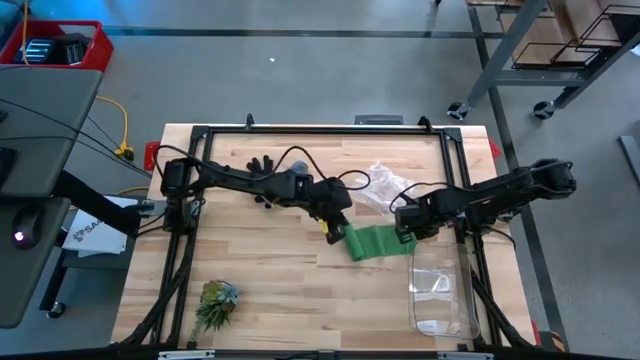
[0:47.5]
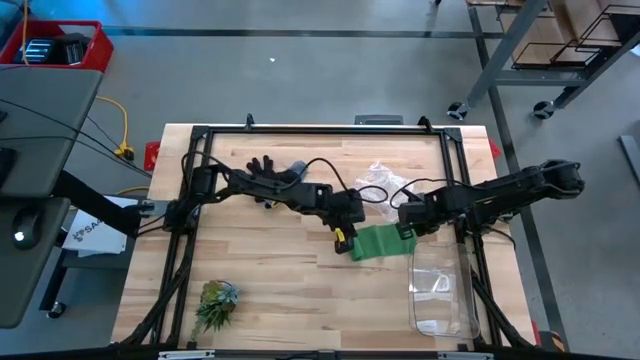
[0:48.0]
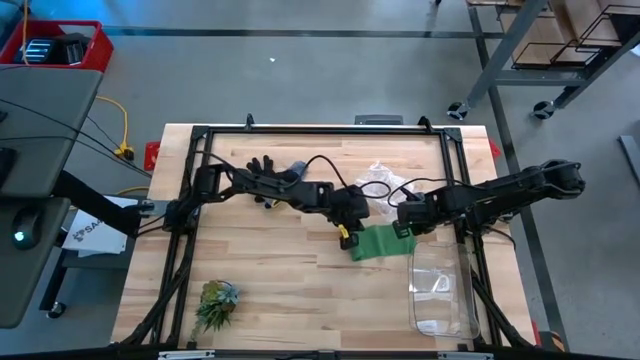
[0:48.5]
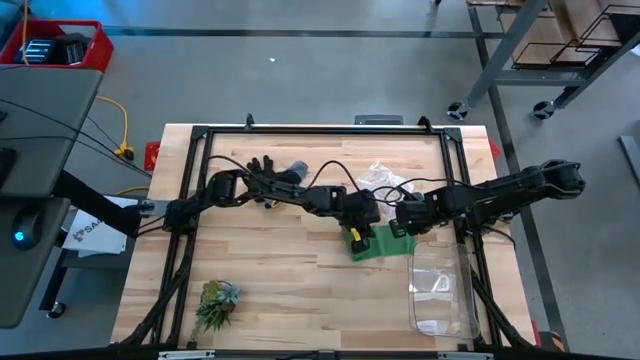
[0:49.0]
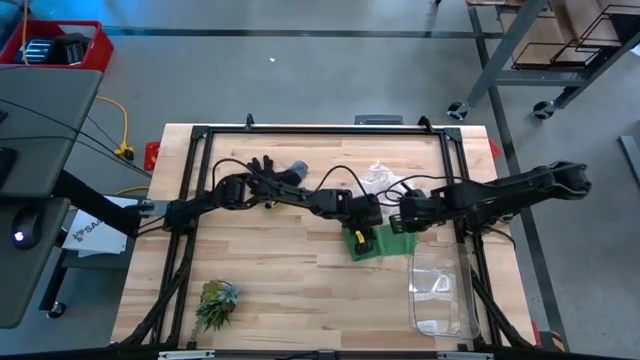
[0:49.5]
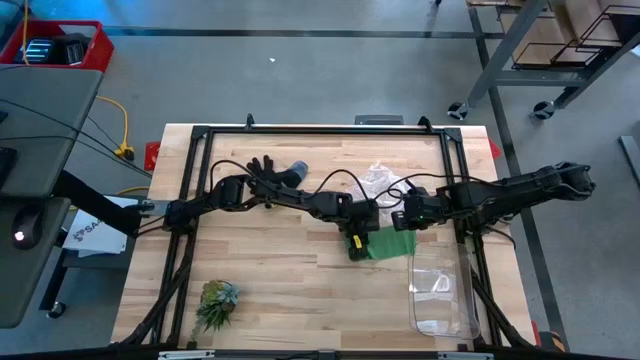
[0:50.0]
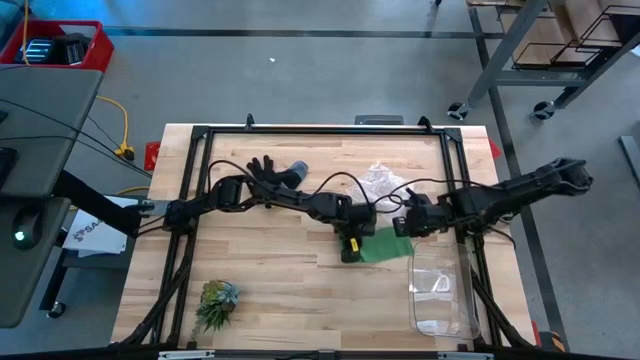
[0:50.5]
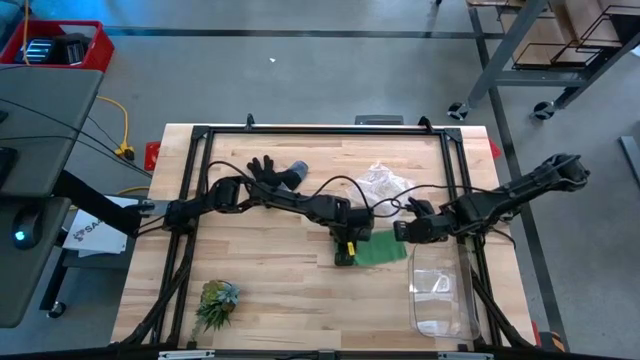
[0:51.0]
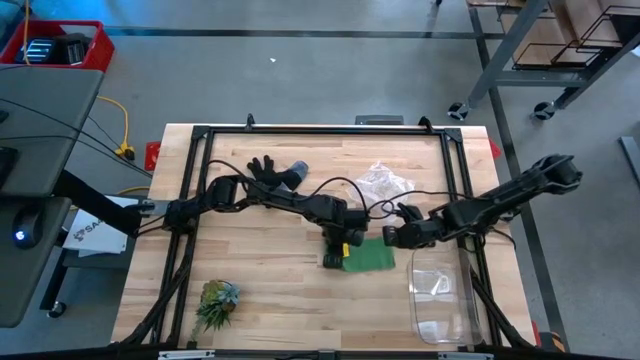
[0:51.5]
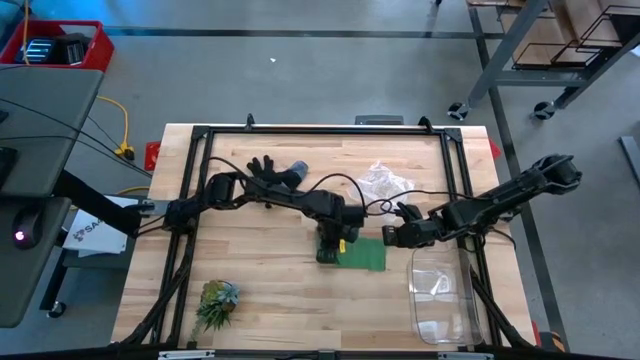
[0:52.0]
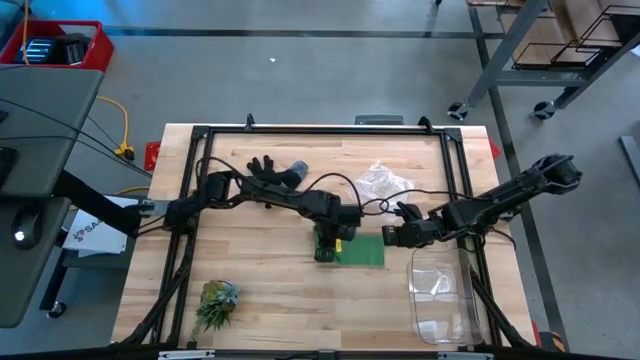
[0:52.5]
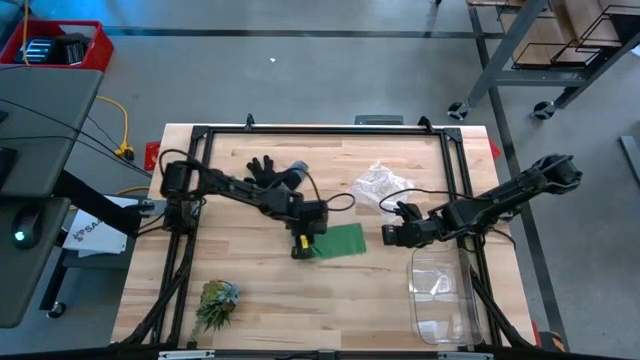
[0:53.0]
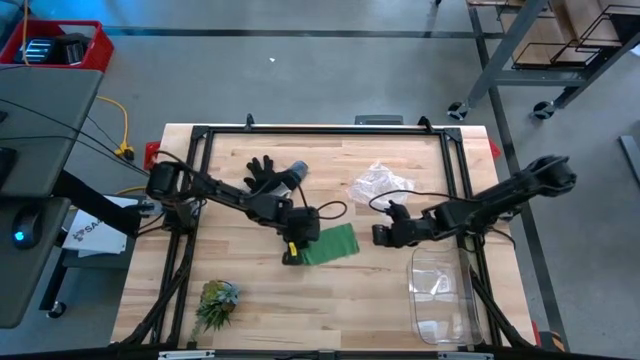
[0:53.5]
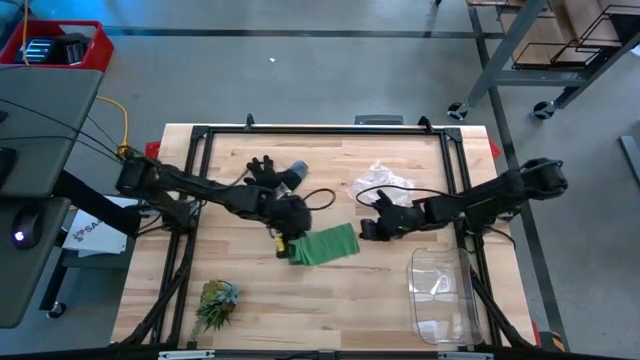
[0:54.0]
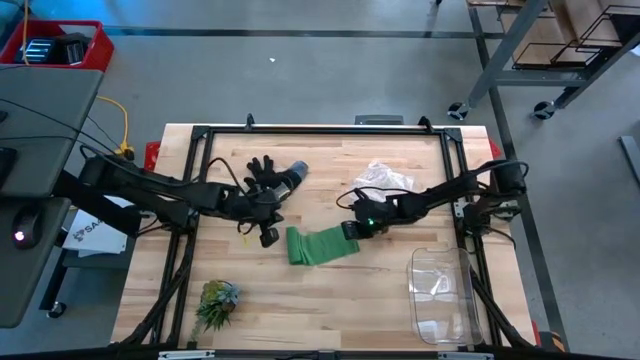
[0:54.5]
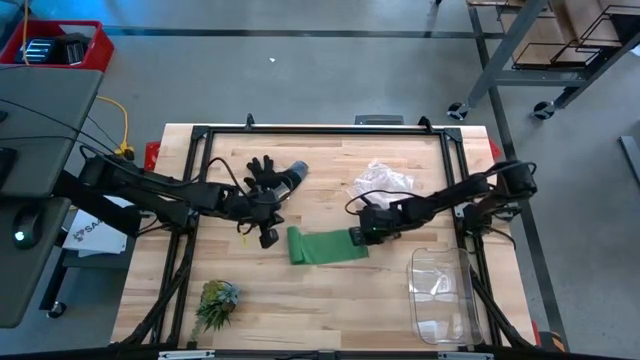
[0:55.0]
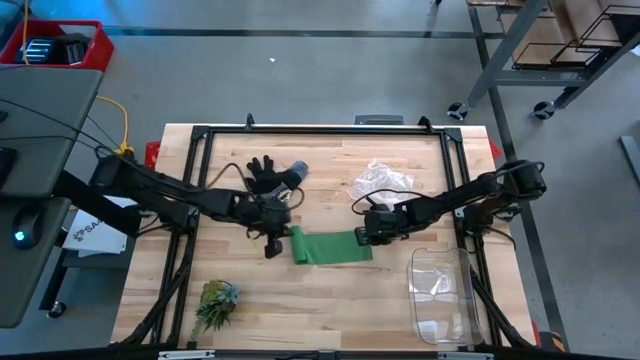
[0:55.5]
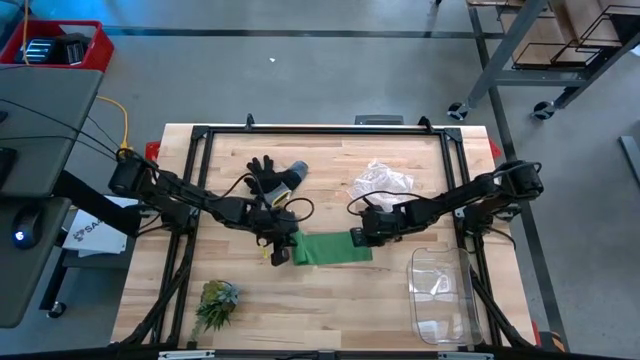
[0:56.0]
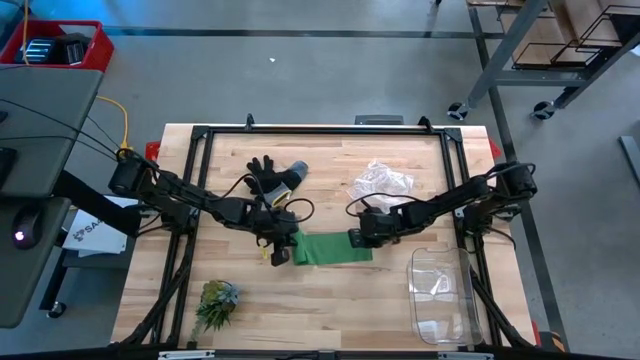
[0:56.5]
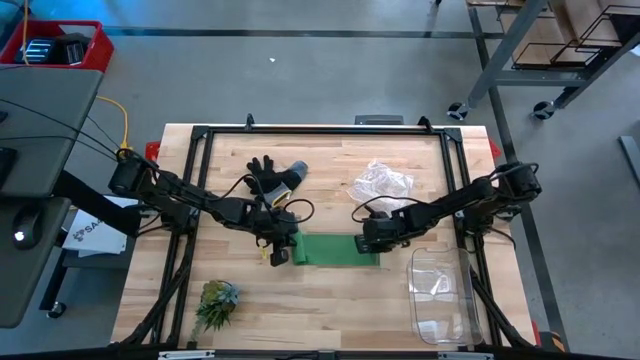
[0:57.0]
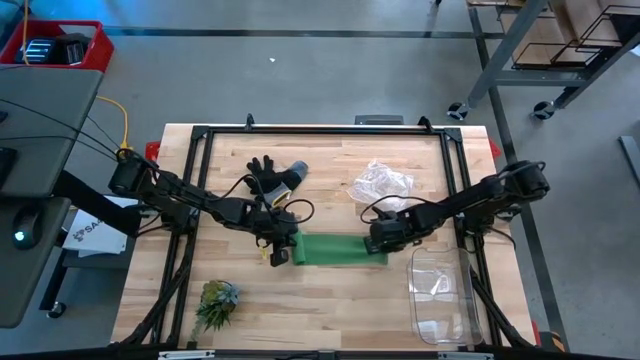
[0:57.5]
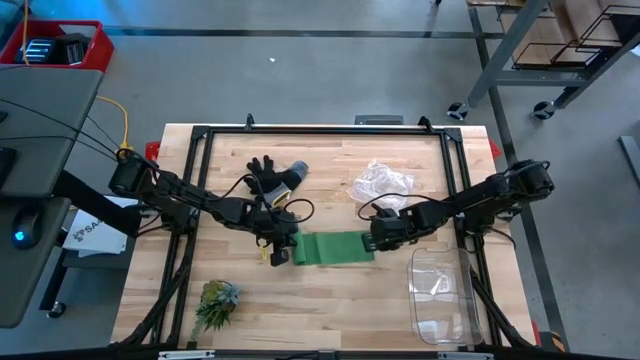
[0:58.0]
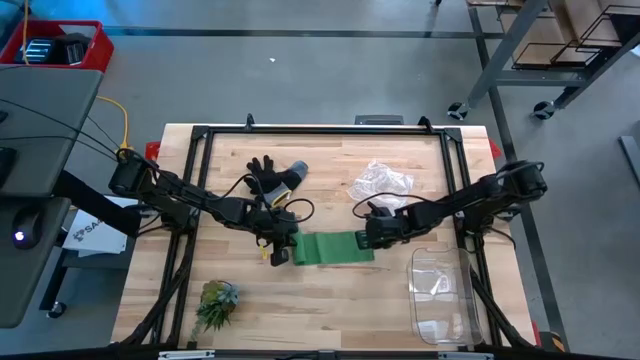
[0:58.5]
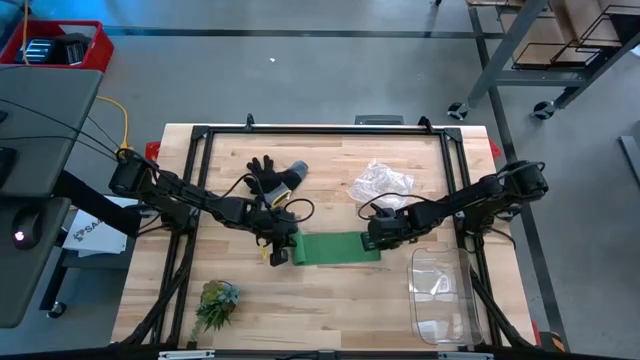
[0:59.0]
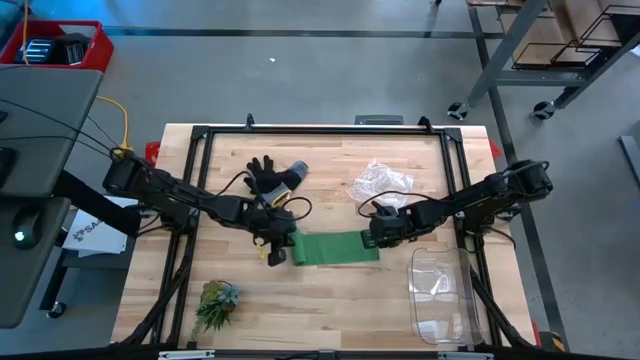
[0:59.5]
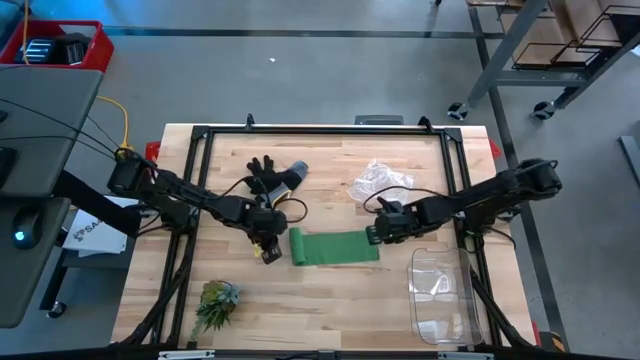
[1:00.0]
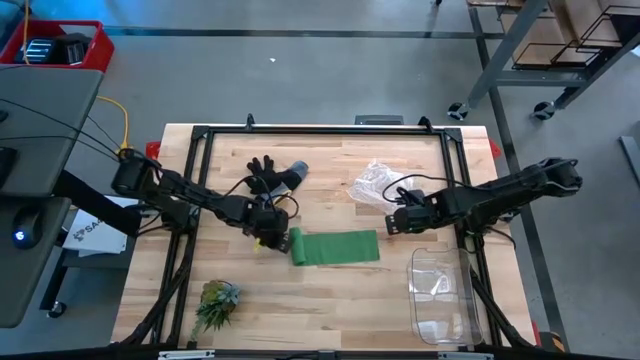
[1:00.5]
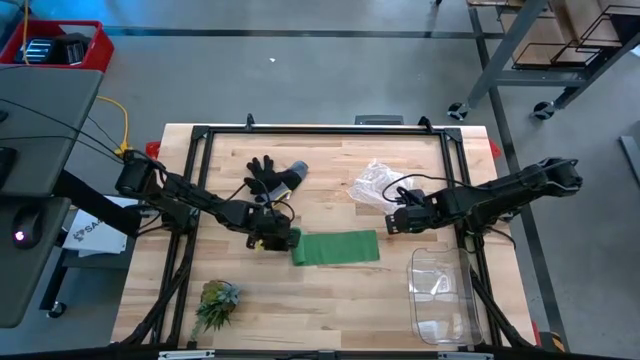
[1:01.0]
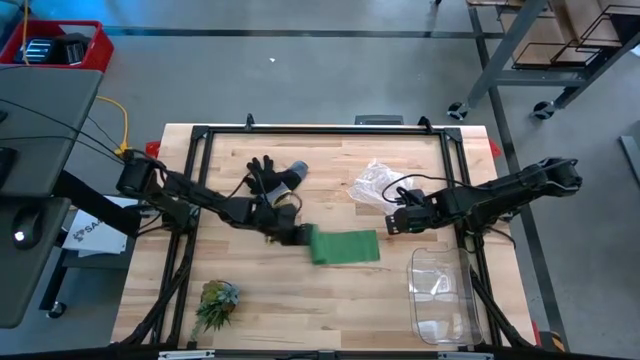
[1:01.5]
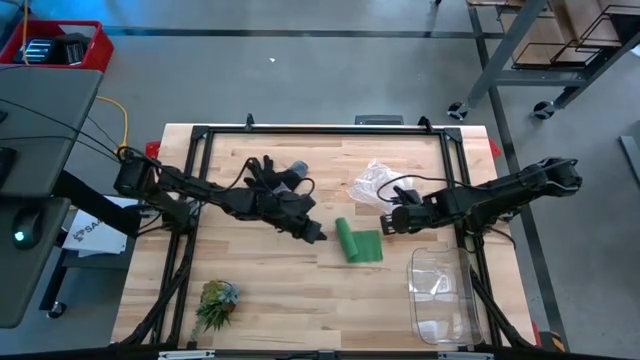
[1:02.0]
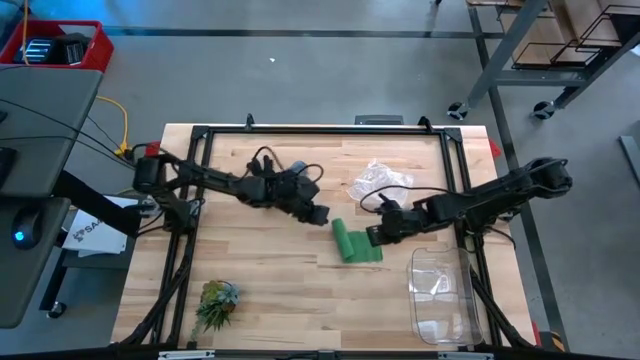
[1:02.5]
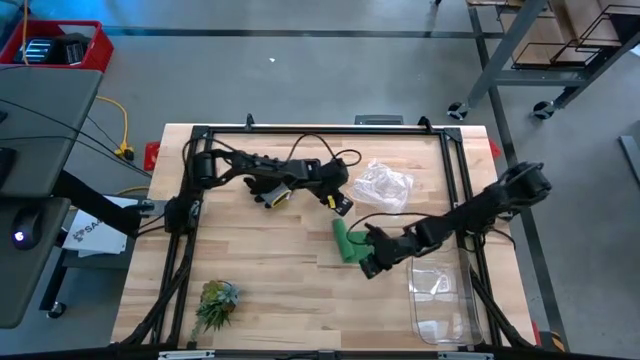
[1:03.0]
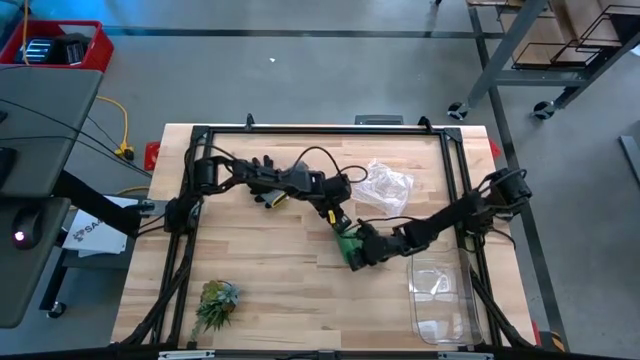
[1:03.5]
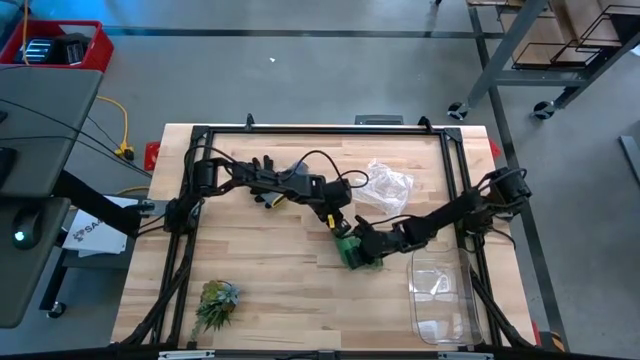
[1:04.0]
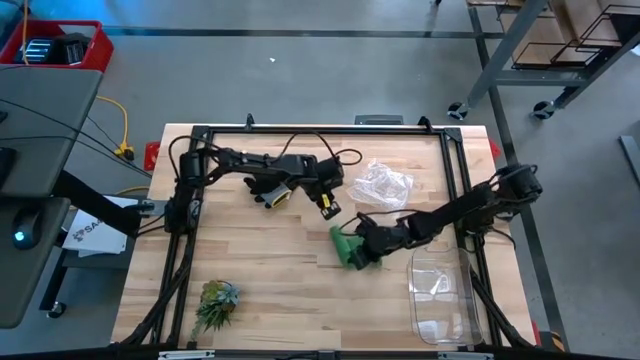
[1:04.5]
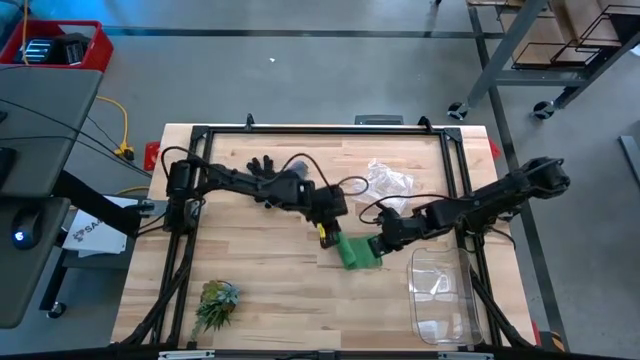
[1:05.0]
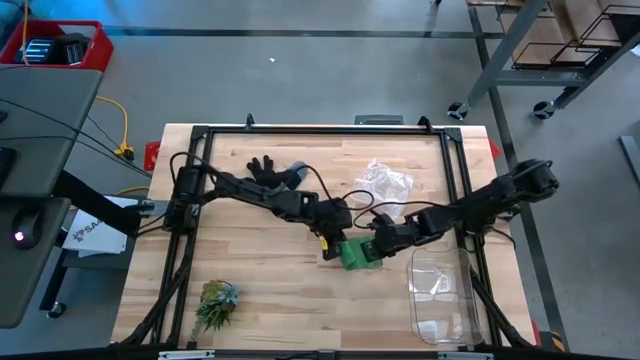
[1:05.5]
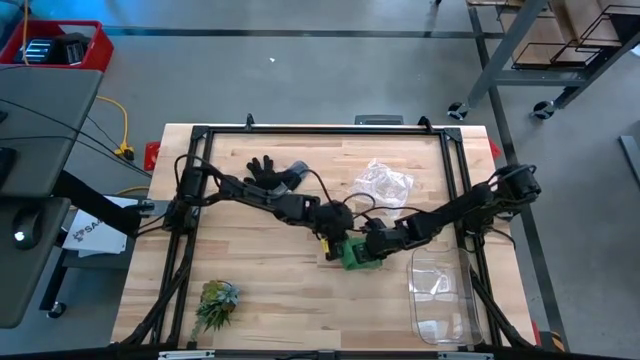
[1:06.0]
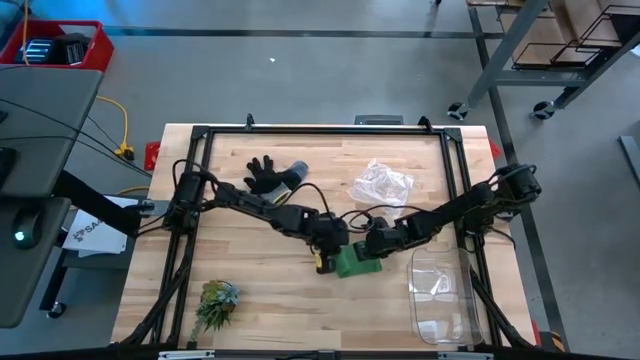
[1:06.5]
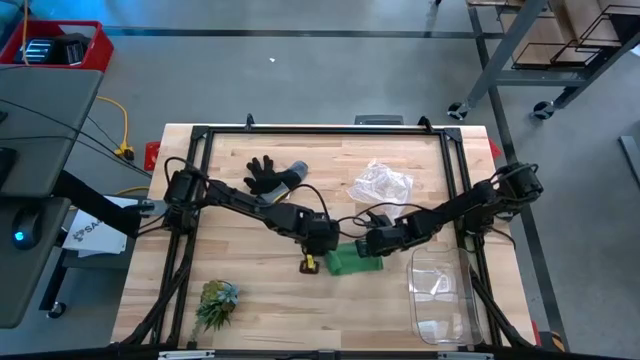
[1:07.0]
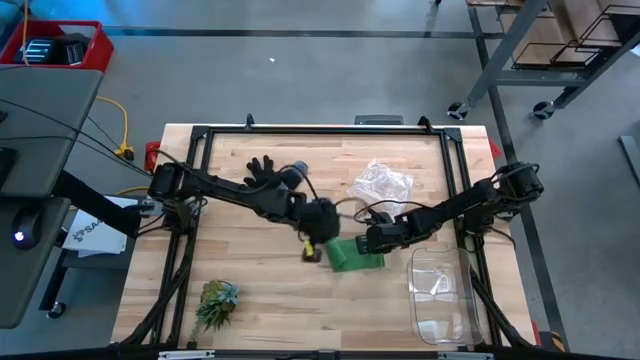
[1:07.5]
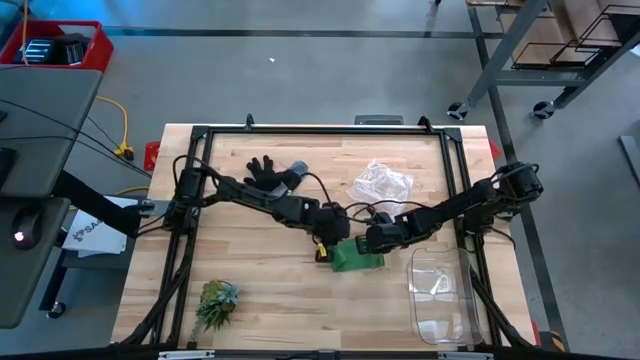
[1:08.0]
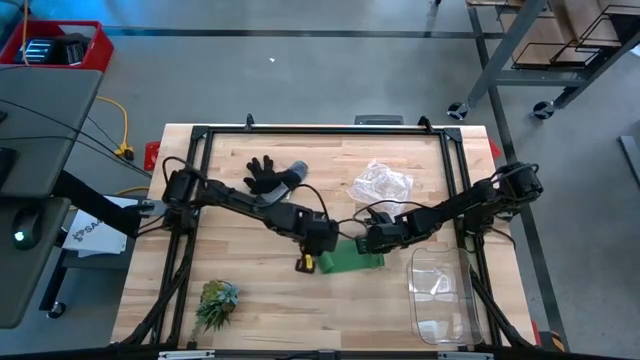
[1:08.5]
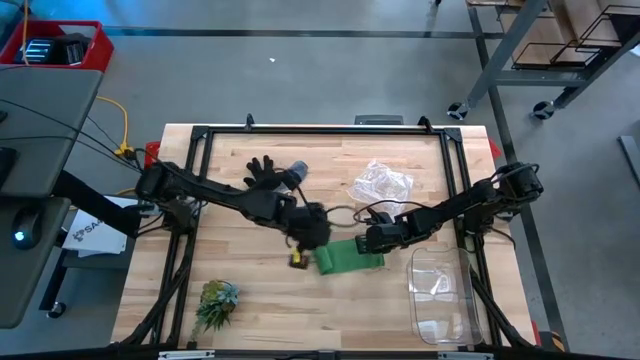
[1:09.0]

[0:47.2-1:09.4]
Task: Roll bandage
Roll the green bandage
